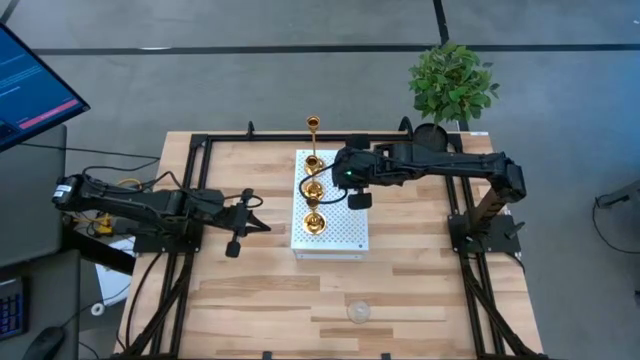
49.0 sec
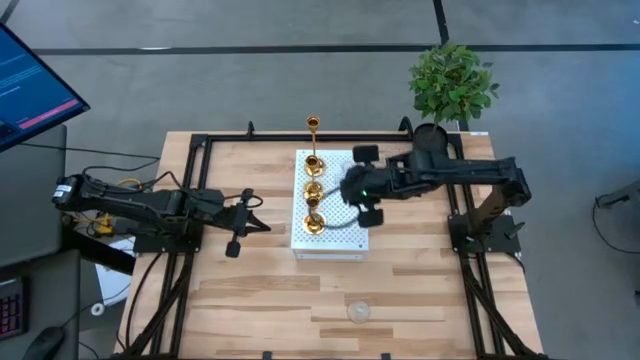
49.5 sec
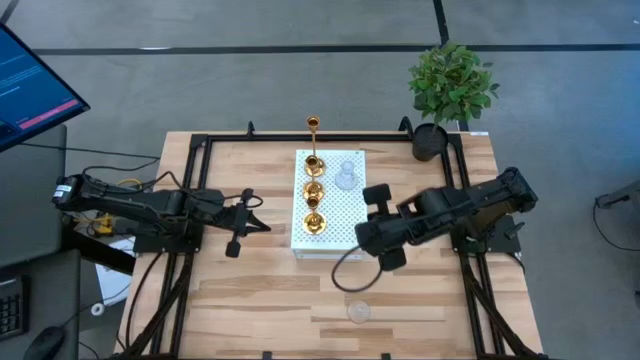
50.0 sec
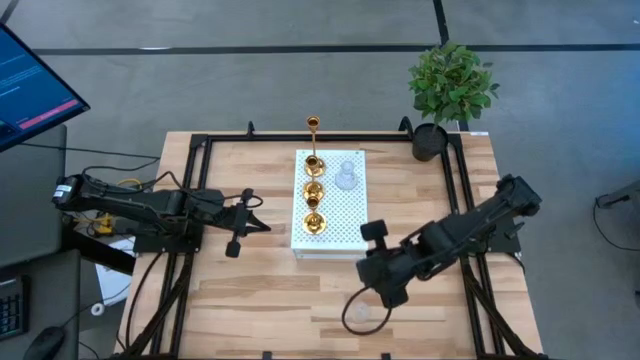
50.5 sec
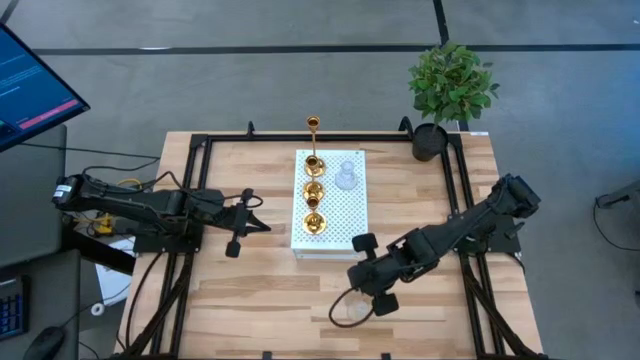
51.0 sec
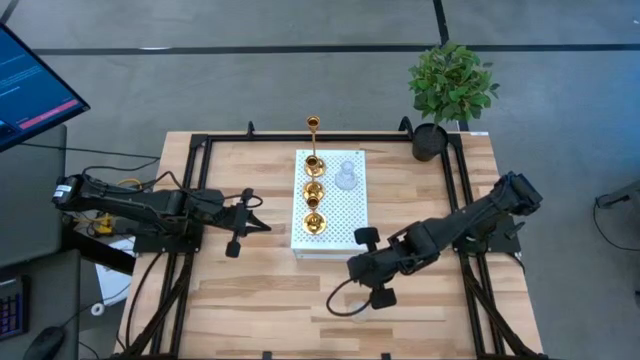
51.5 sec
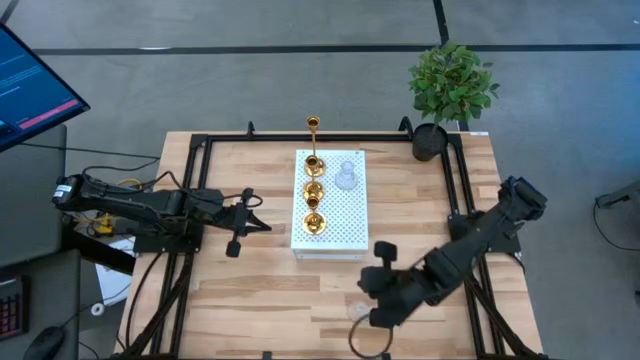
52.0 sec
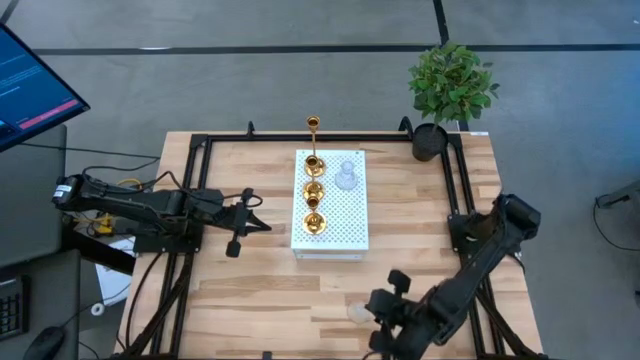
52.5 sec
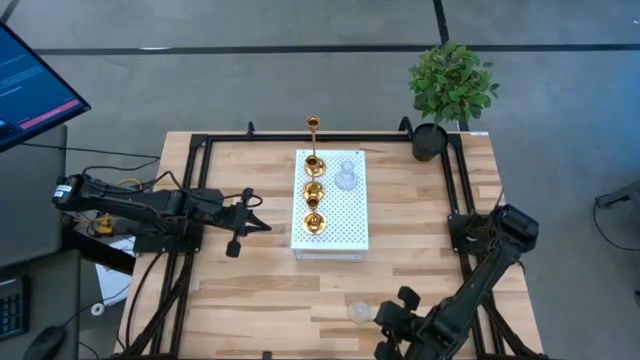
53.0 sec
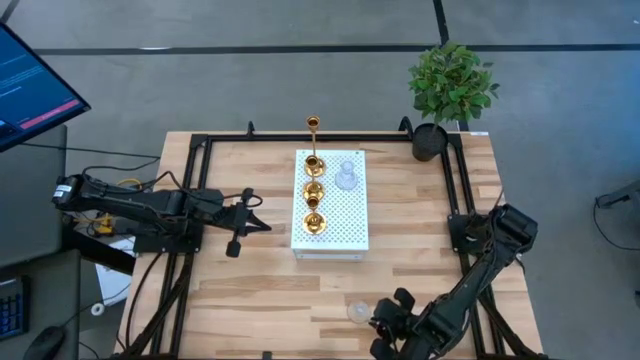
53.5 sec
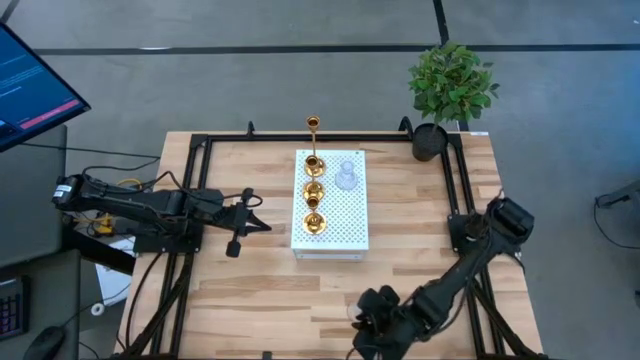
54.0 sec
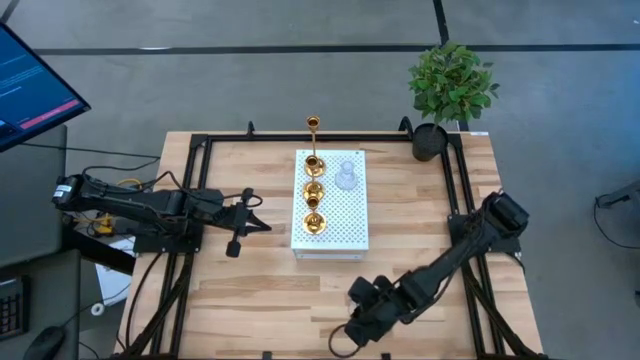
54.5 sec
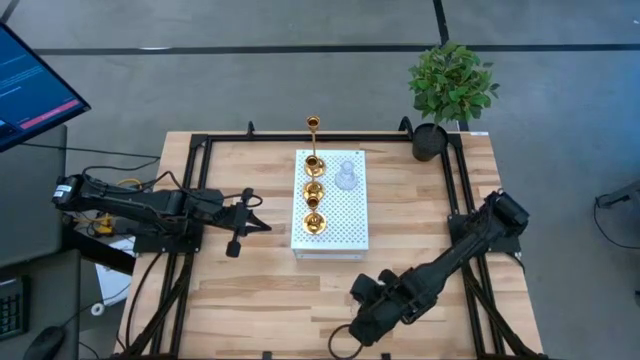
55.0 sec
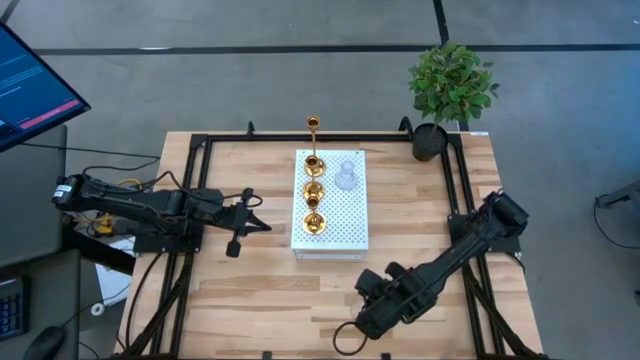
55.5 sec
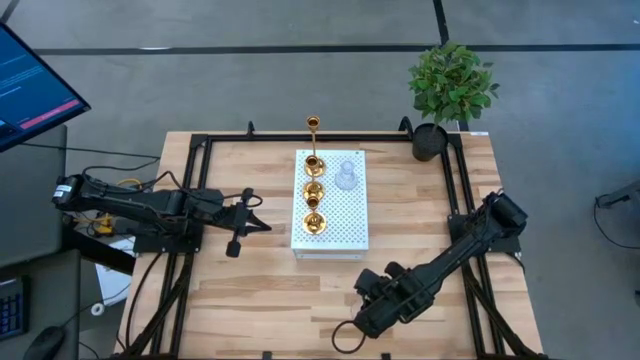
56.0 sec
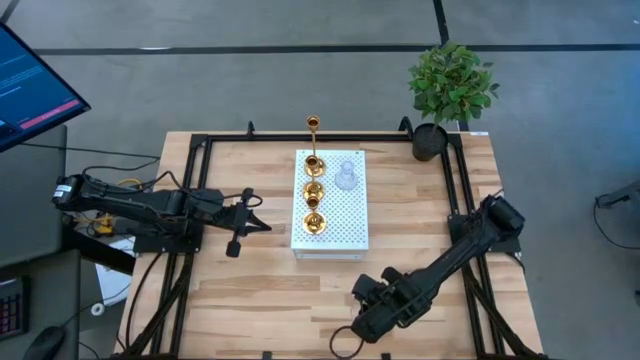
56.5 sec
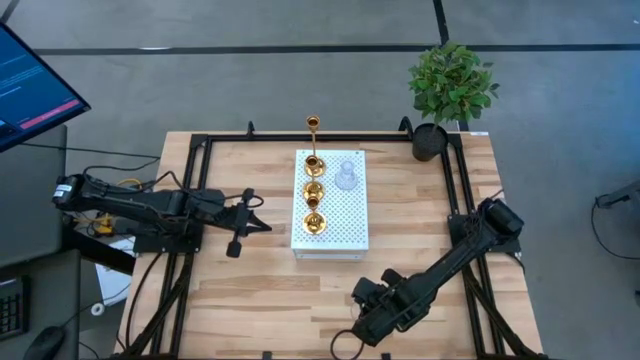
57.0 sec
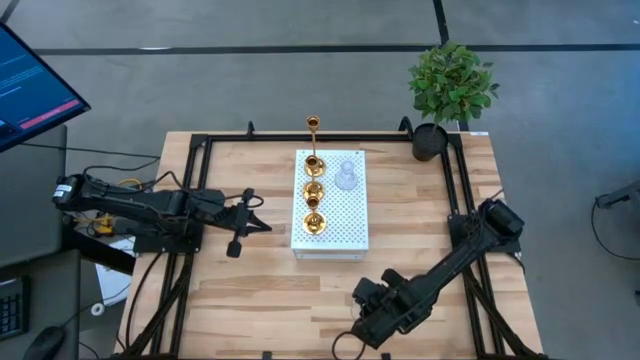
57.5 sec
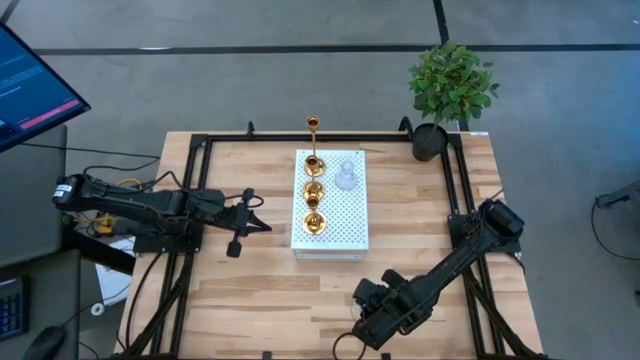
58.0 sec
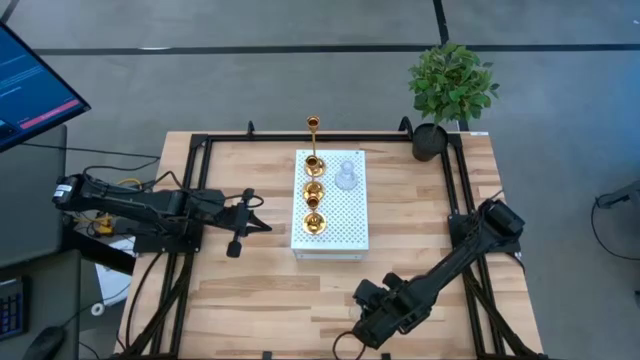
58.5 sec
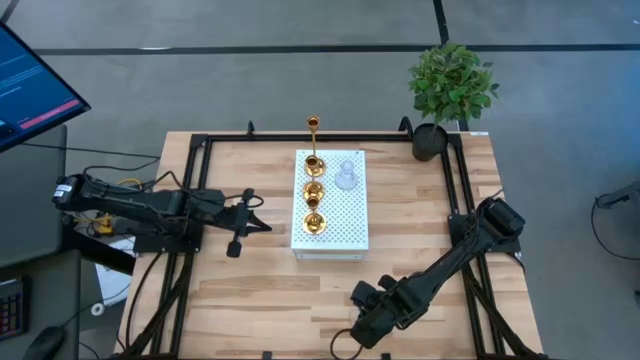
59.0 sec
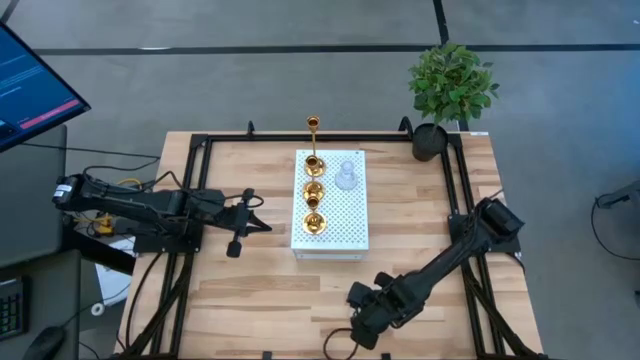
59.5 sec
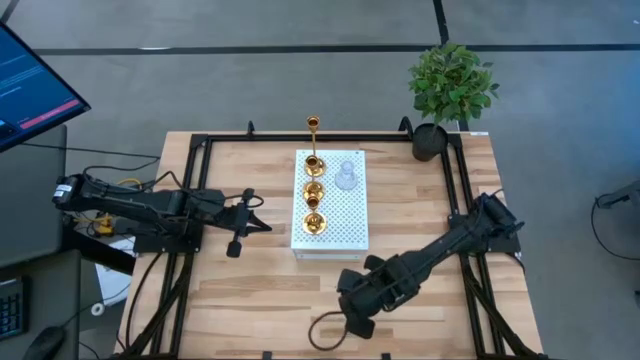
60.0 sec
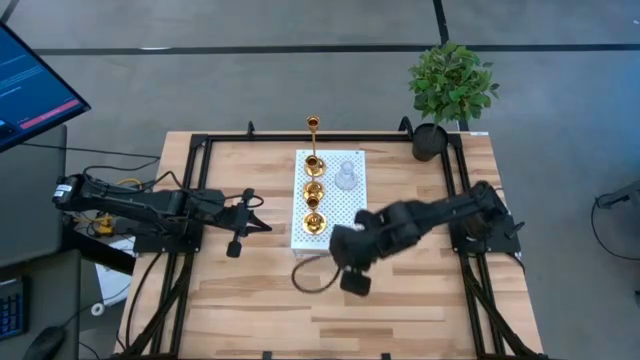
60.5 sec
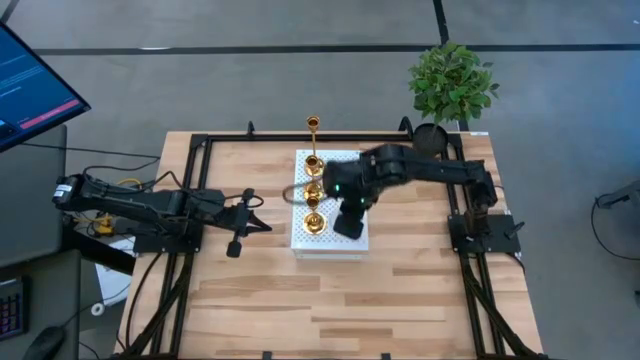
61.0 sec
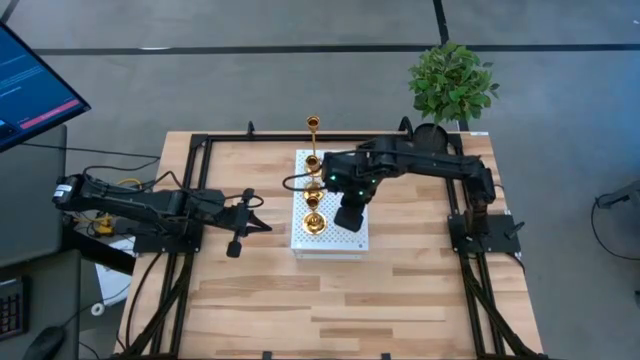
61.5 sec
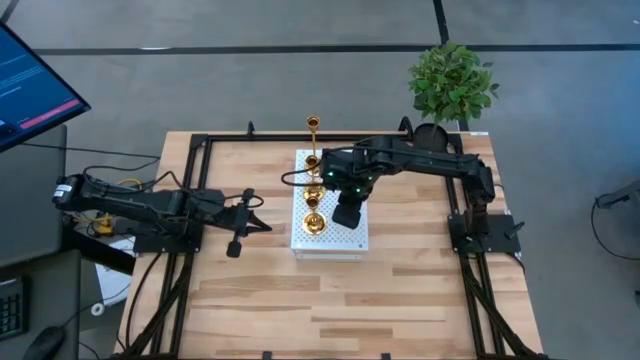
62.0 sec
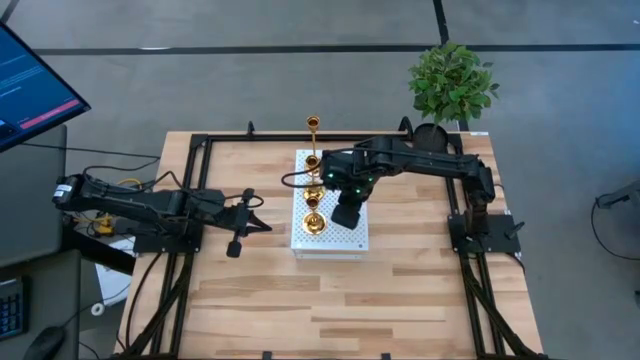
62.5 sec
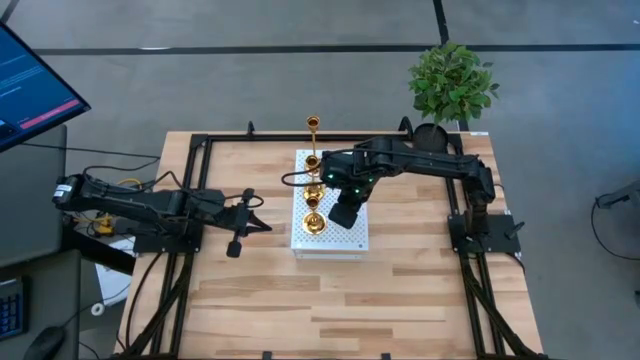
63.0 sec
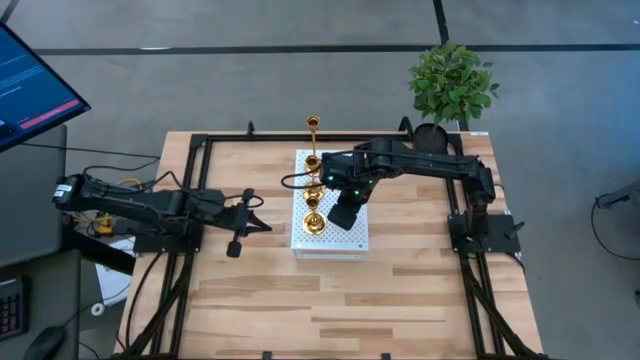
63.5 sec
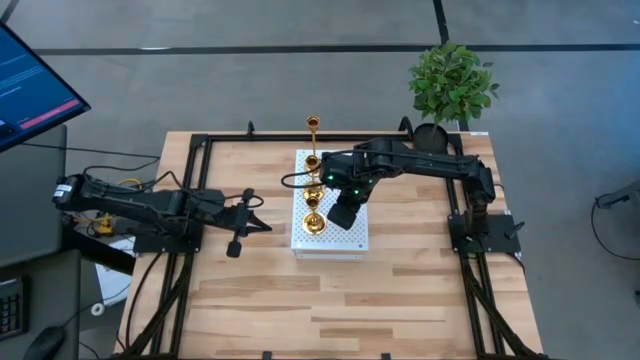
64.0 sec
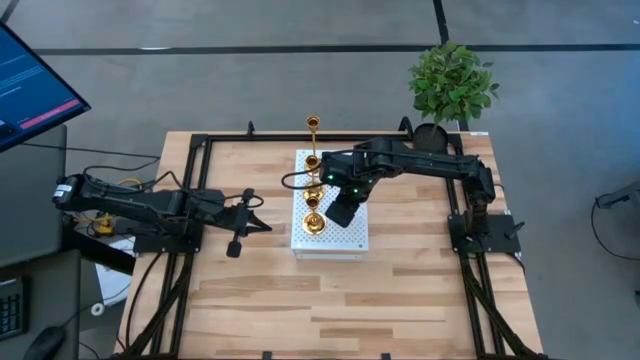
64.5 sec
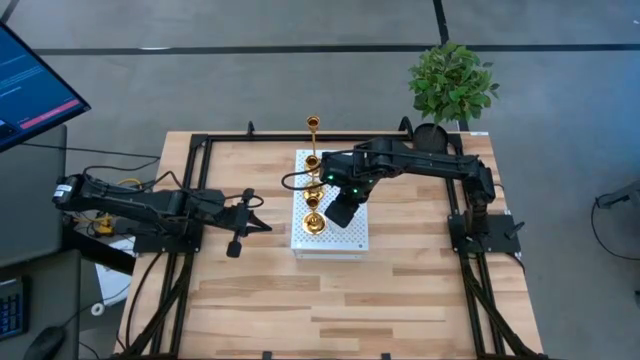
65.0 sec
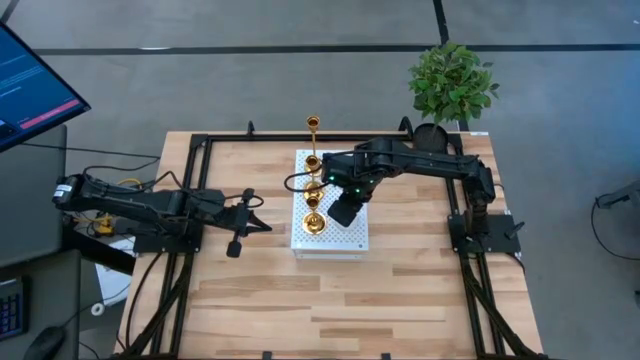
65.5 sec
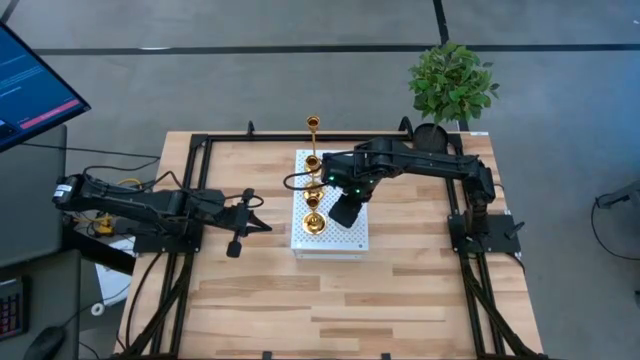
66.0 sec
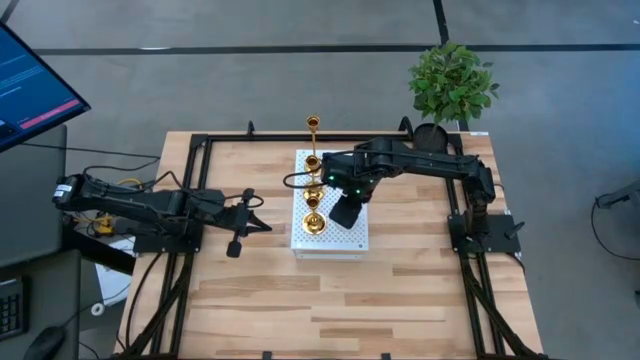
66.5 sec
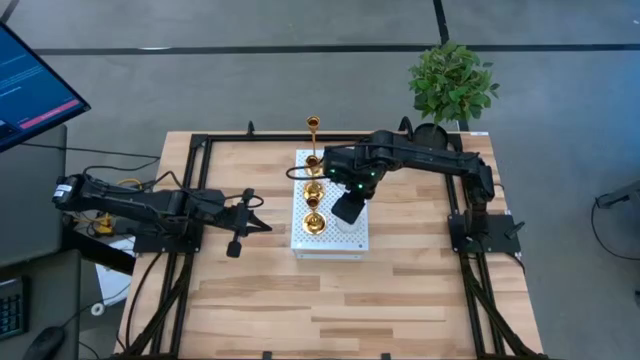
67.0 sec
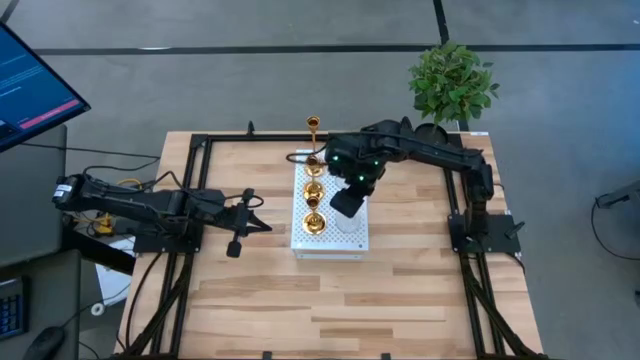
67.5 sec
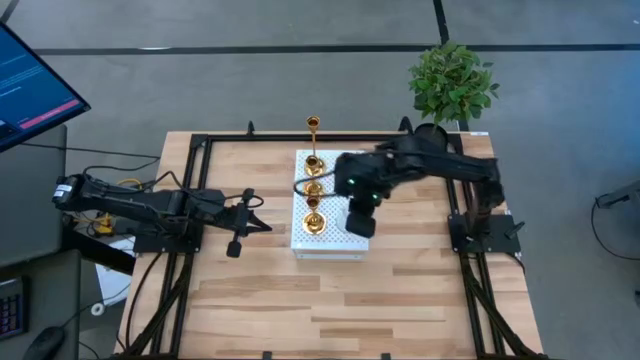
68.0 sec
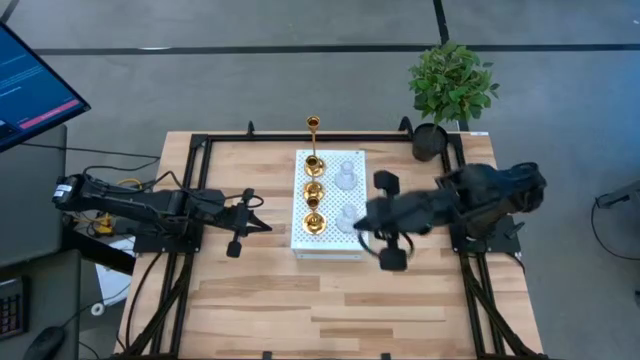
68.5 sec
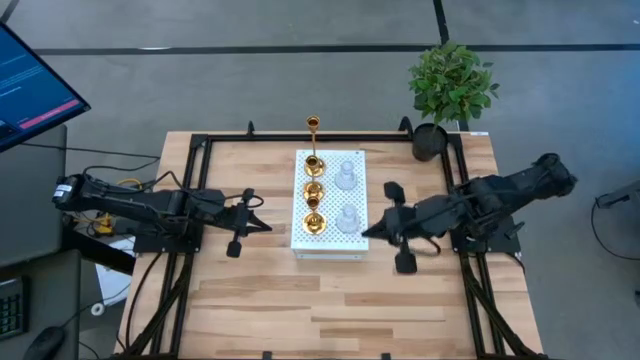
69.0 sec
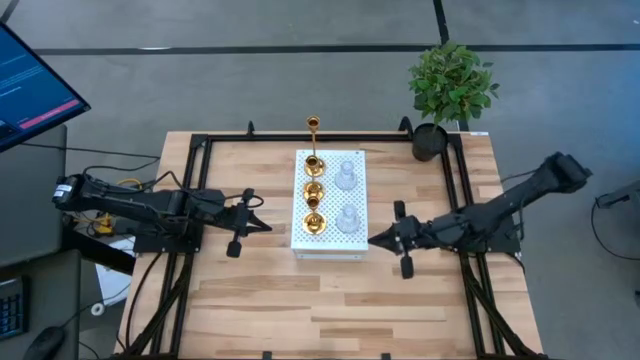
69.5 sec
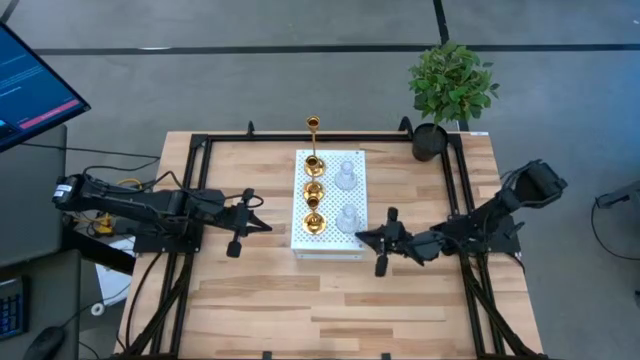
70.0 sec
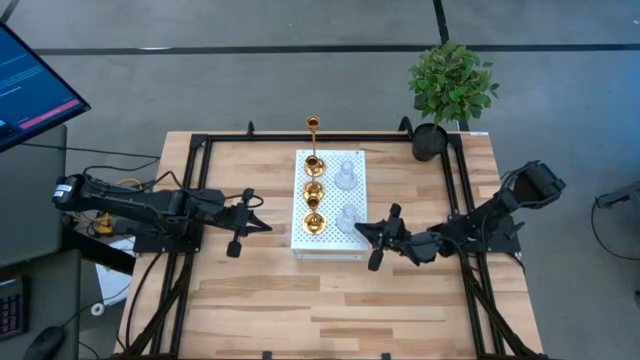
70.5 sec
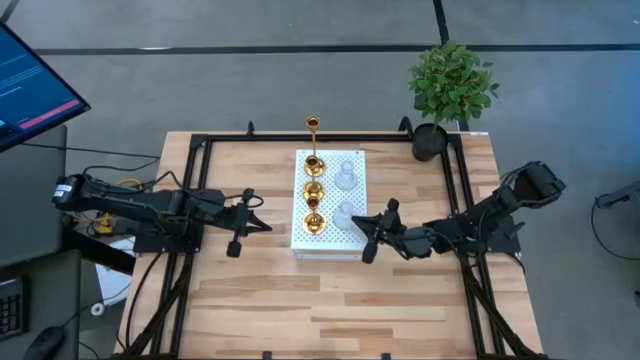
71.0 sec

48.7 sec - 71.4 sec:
Task: Pick & Place candle stick holders
Put the transparent candle holder on the shelf aligned with the other transparent candle holder
